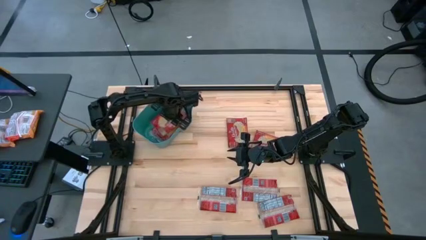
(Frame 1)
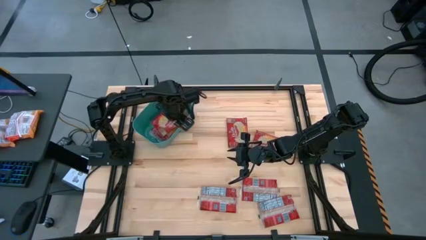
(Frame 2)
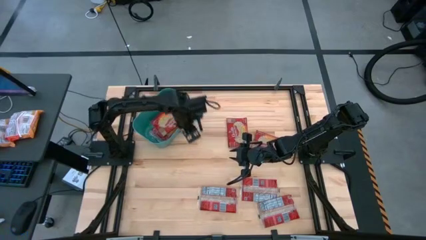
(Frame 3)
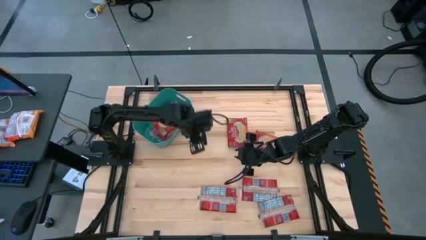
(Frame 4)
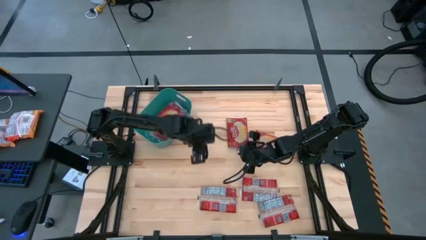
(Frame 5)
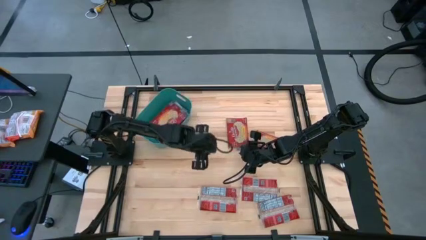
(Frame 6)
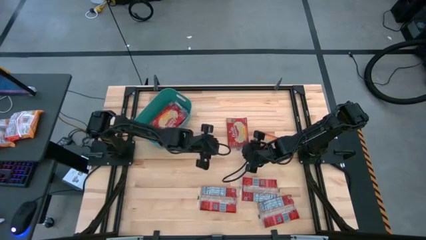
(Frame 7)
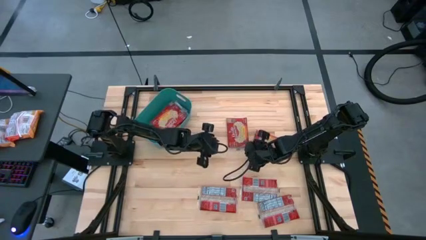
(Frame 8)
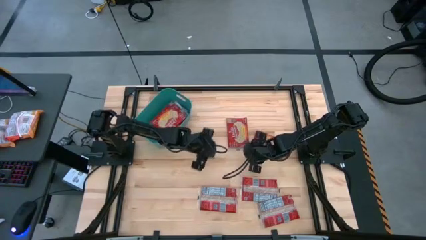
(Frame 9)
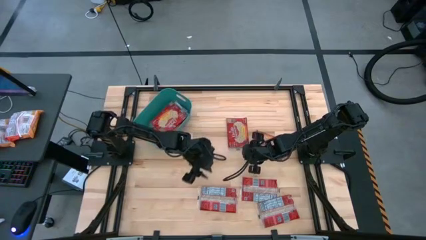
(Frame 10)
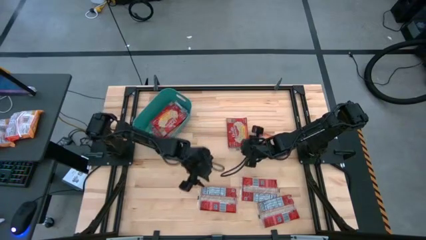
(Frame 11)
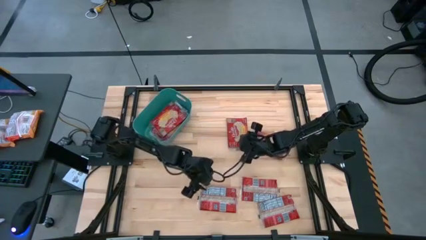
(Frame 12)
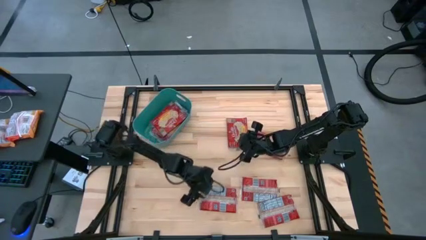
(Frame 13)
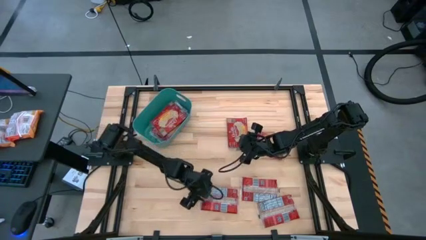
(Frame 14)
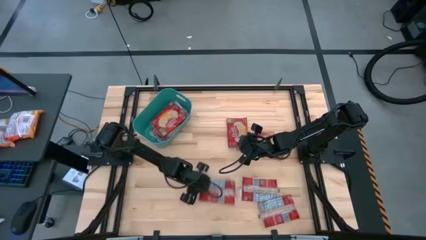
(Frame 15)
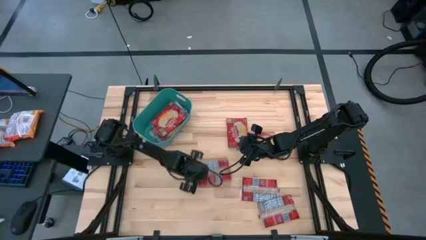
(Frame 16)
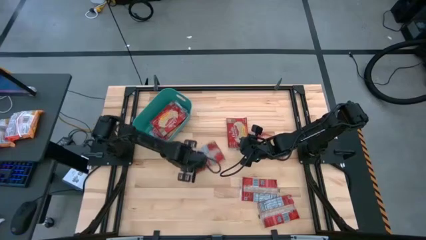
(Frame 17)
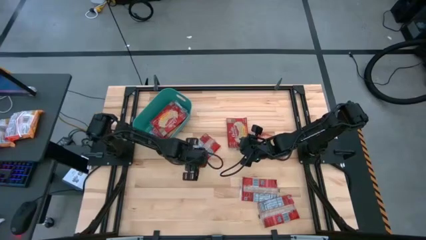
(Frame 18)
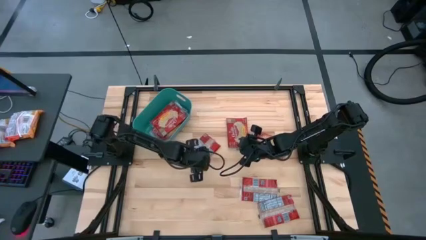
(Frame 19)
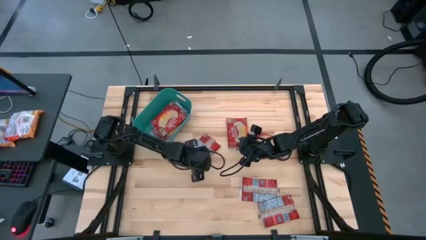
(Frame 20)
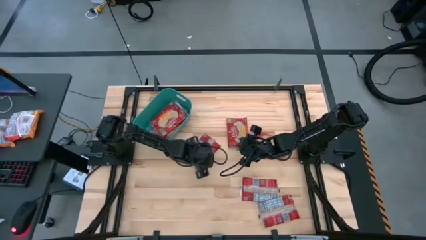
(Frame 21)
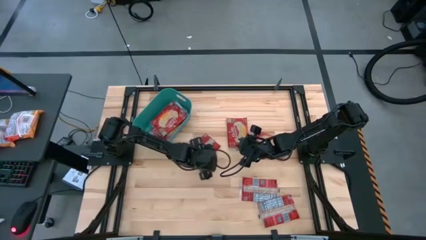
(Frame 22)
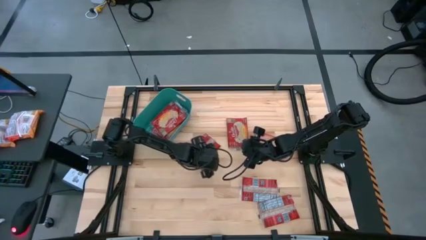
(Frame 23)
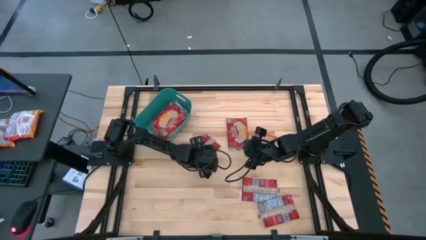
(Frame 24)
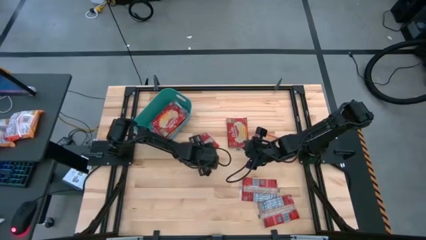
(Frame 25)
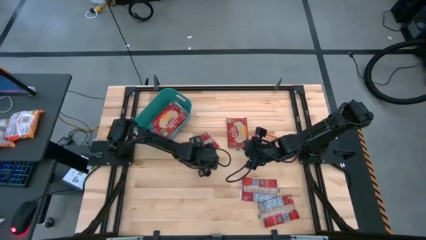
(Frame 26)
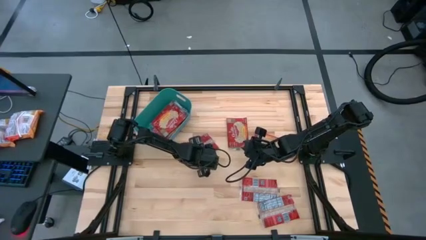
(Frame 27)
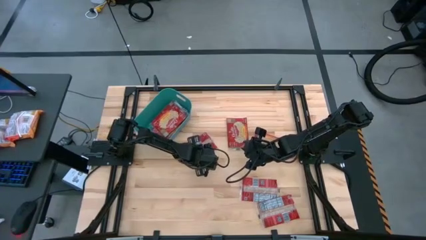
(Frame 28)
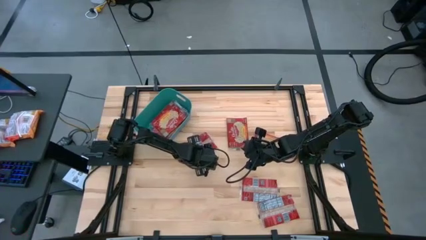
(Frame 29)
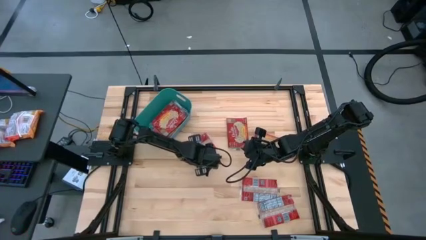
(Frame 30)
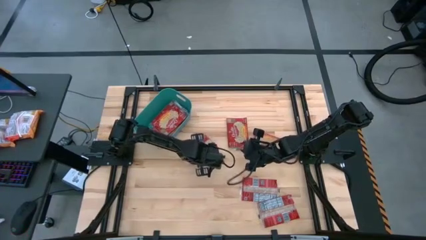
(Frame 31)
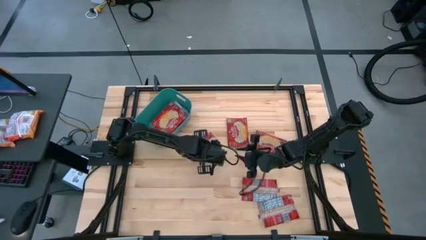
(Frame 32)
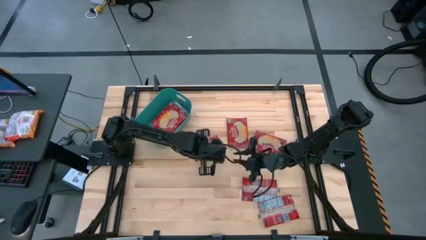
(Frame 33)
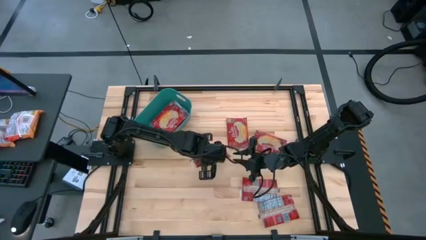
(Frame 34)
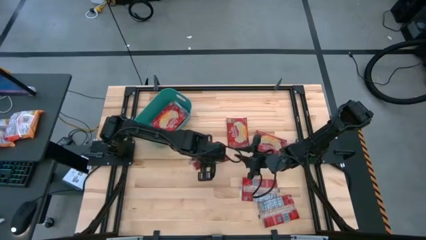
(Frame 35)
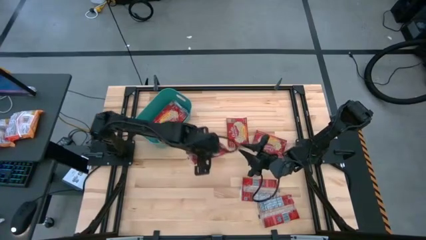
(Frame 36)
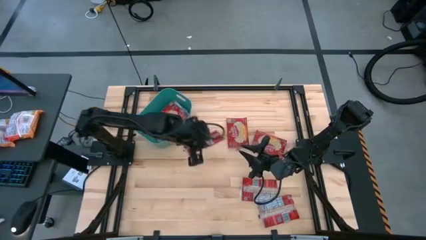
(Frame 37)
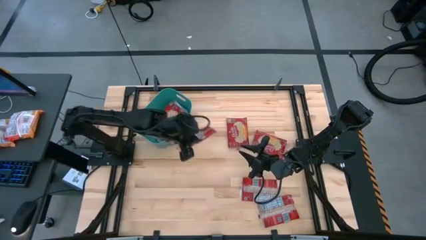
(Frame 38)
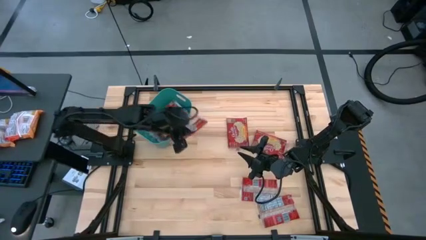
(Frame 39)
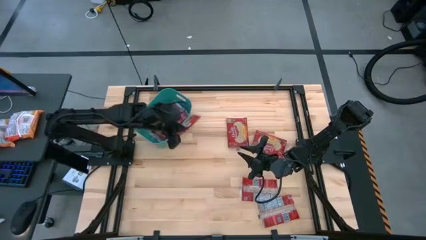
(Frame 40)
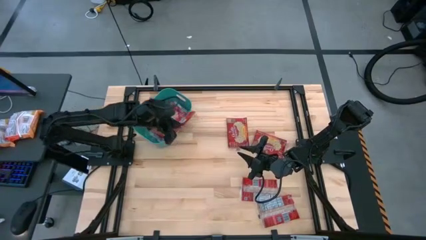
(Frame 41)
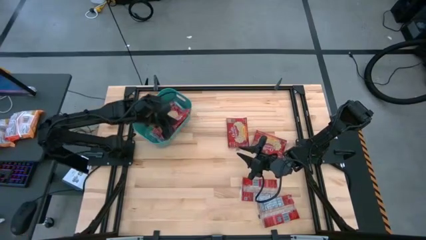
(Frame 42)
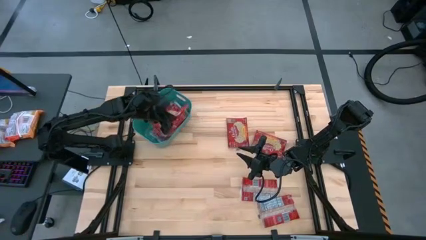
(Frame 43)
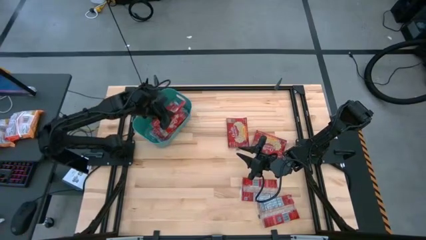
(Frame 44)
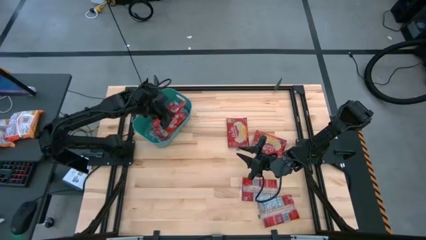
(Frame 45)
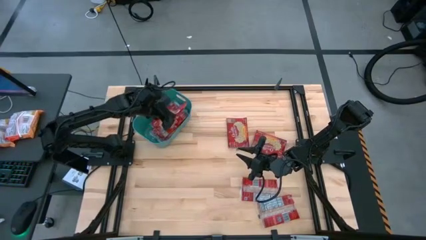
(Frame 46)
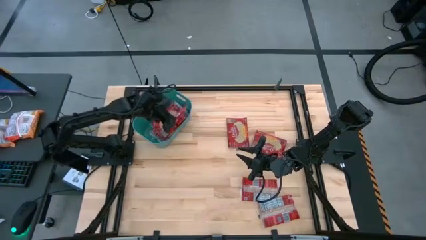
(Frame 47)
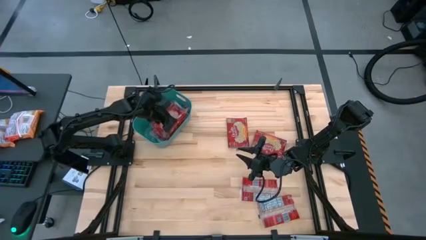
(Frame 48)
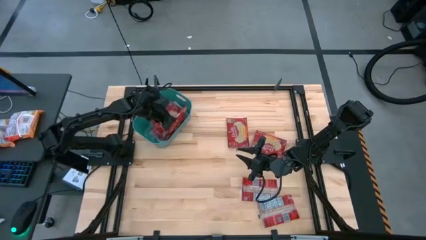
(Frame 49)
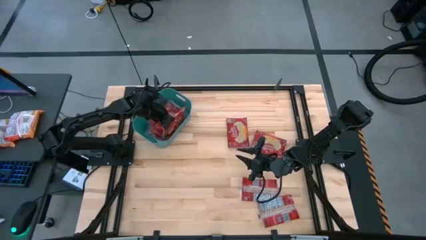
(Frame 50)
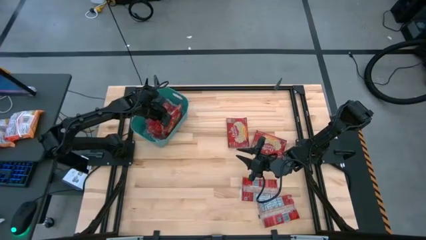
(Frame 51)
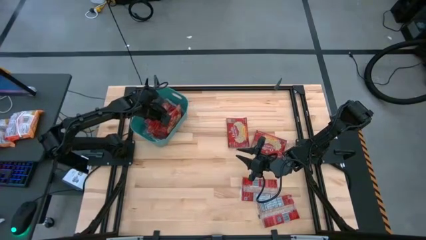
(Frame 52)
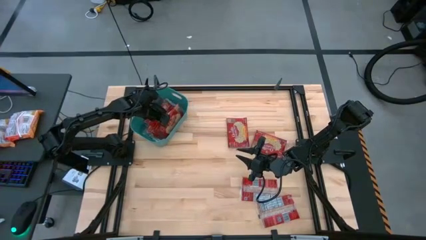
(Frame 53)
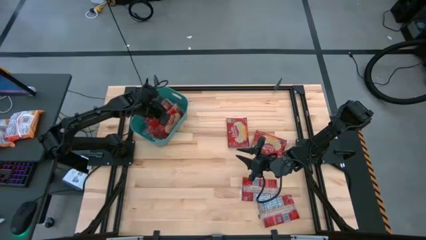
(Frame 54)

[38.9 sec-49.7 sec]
Task: Sort popcorn bags into baskets
Put the red popcorn bag into the green bin

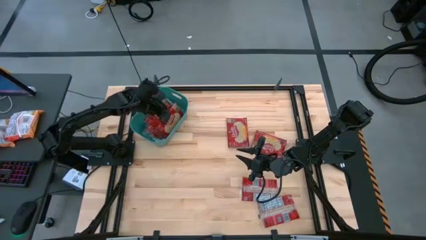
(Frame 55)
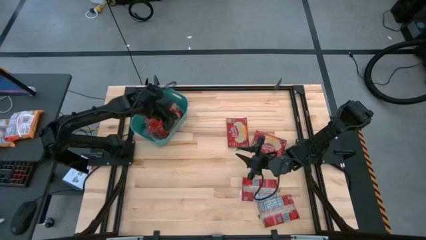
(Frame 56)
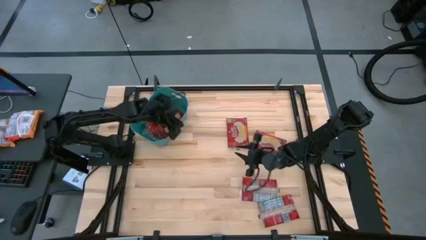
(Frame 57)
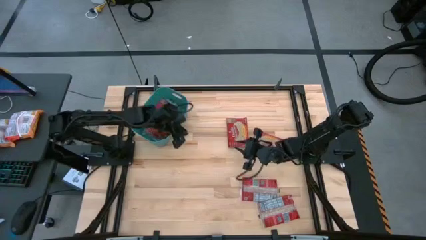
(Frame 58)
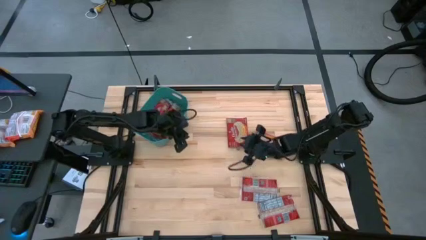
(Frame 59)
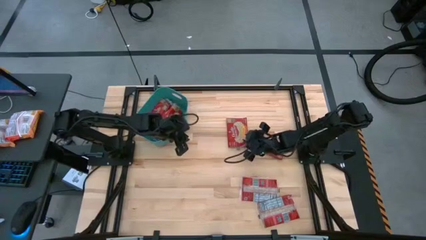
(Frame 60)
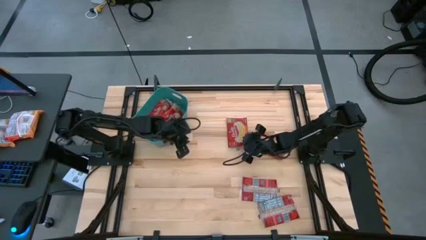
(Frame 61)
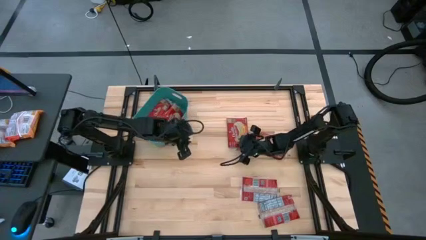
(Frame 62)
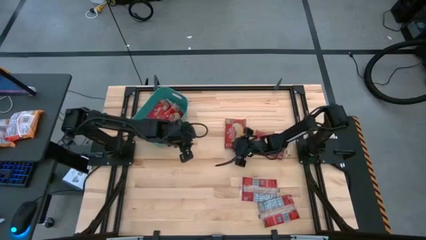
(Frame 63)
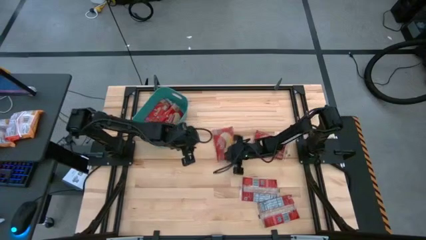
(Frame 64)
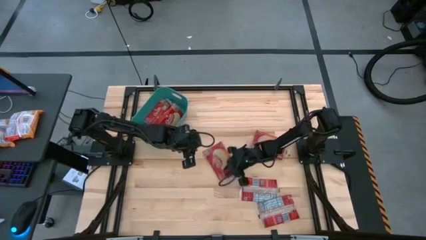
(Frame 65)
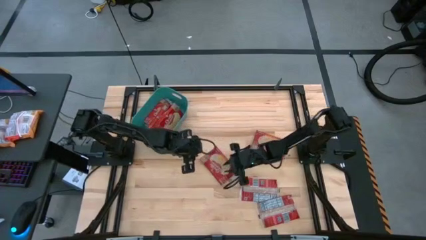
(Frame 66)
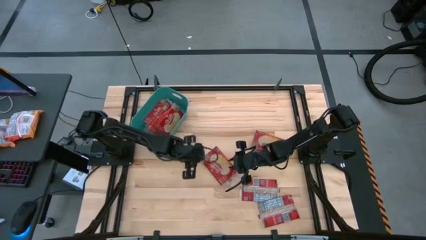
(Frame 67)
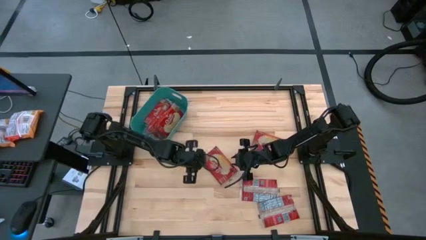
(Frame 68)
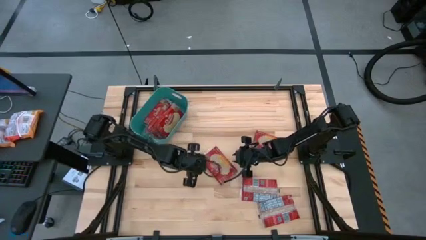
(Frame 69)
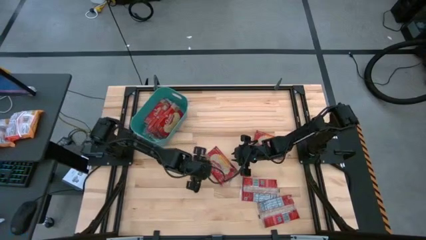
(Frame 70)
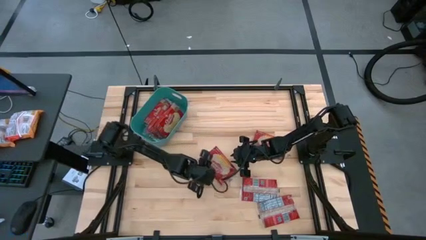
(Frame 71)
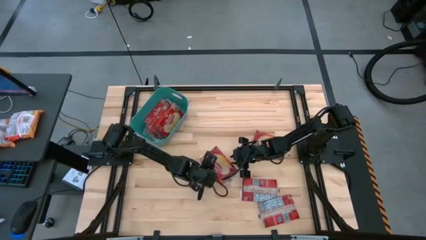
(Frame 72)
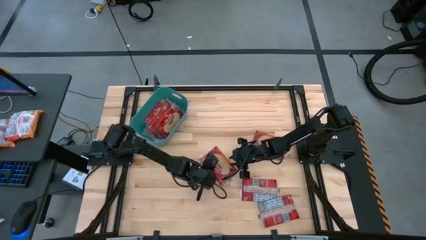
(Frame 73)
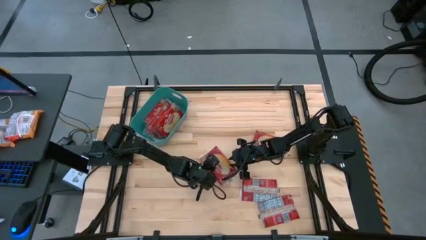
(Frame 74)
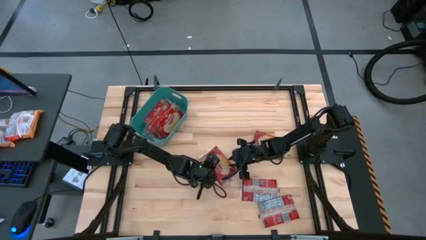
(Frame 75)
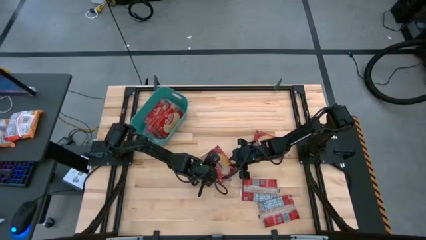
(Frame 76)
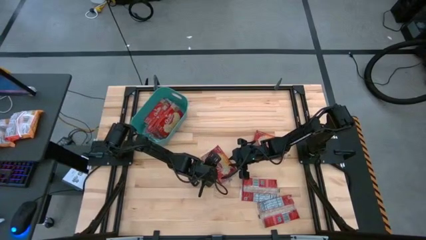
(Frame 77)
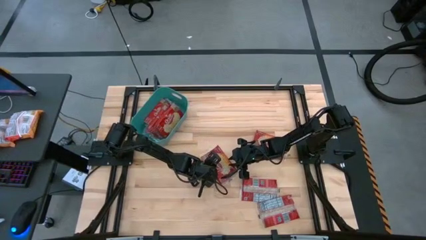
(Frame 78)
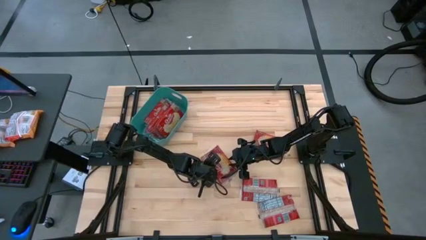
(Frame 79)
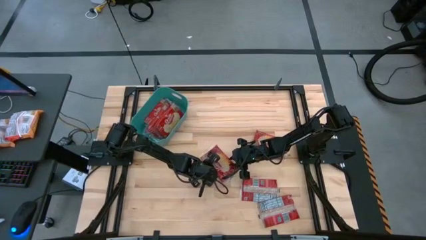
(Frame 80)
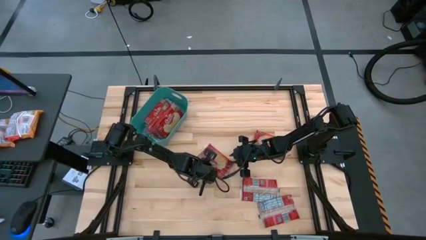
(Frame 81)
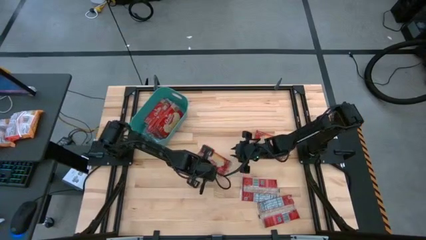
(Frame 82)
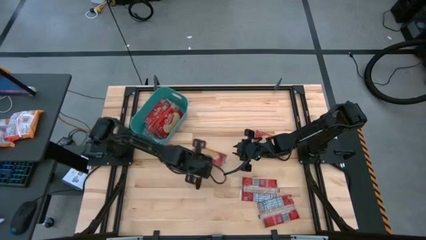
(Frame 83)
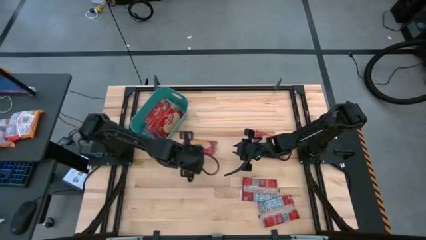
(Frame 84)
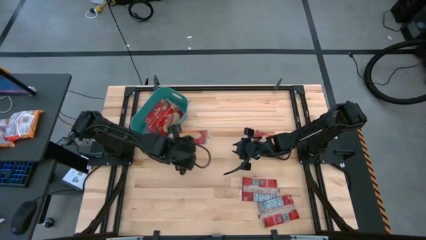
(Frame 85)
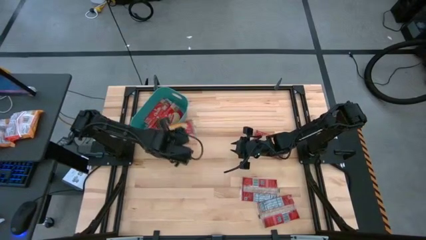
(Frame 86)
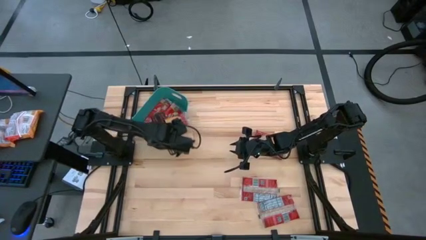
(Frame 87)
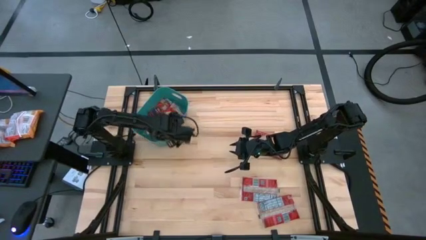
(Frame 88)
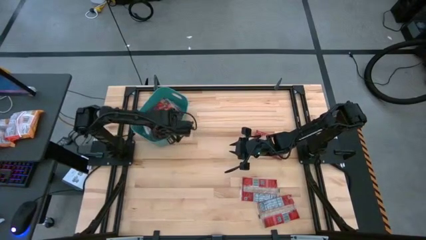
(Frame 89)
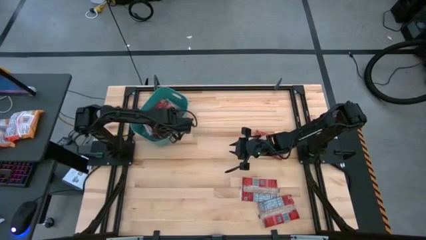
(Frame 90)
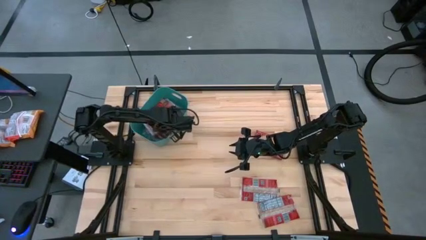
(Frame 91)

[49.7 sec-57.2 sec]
Put the red popcorn bag into the green bin
